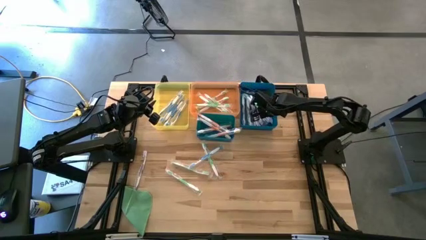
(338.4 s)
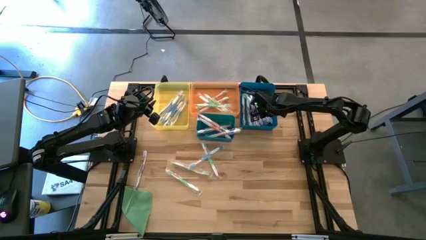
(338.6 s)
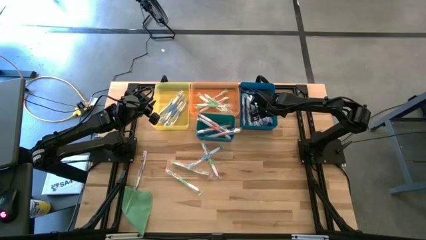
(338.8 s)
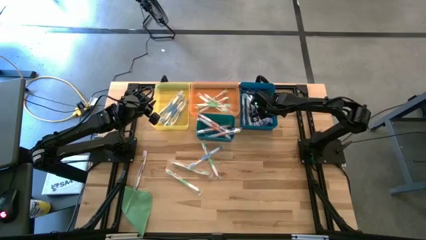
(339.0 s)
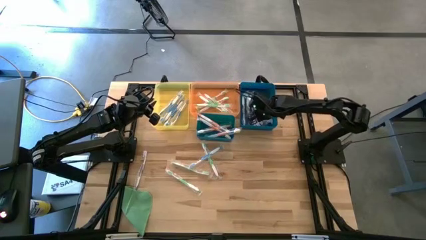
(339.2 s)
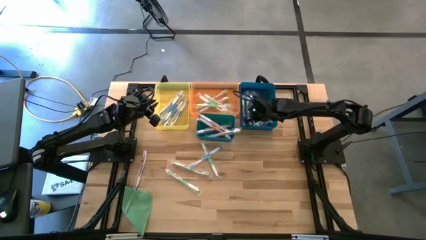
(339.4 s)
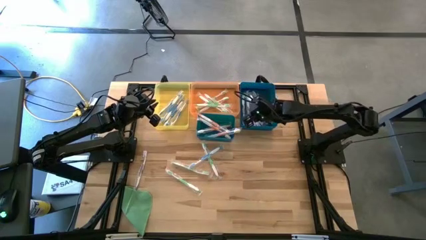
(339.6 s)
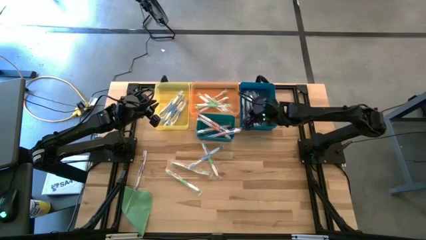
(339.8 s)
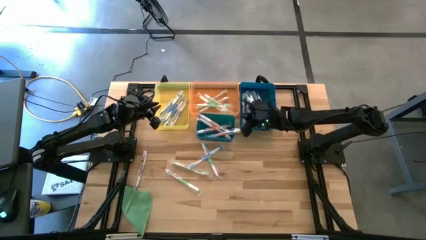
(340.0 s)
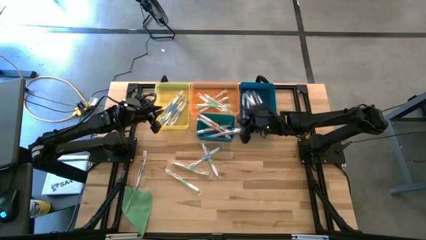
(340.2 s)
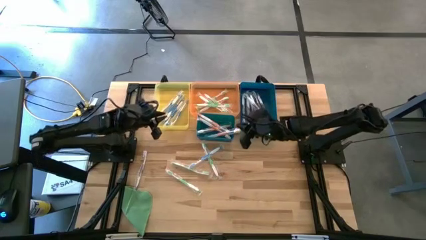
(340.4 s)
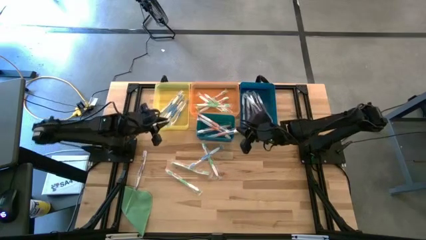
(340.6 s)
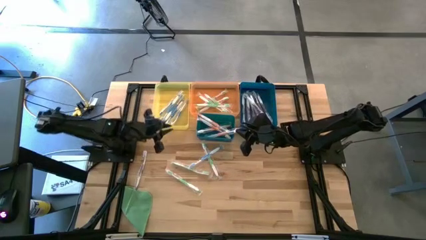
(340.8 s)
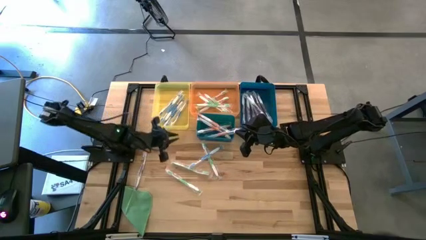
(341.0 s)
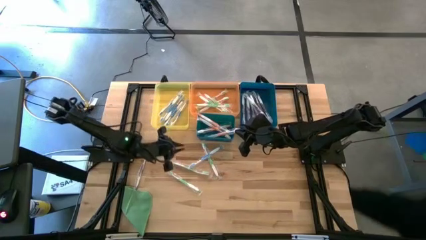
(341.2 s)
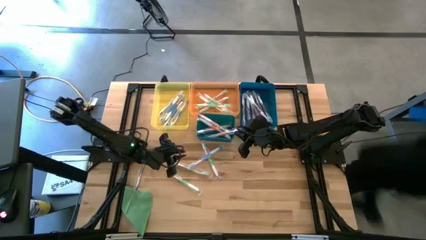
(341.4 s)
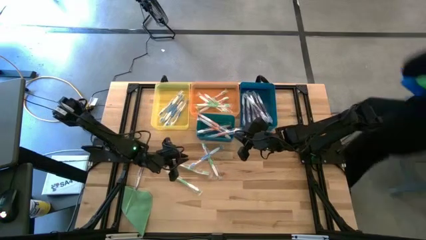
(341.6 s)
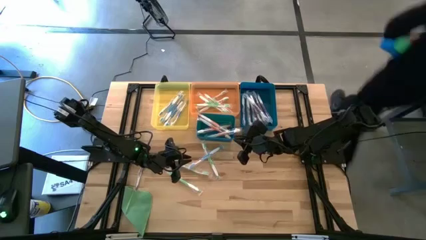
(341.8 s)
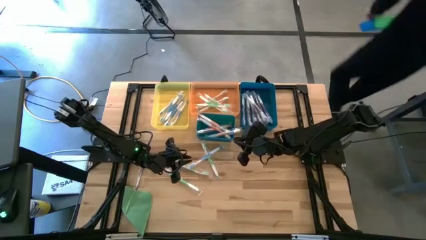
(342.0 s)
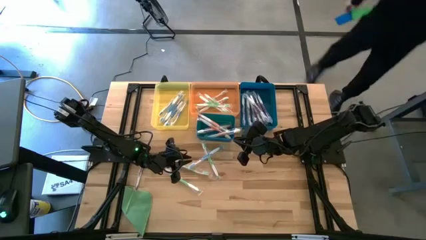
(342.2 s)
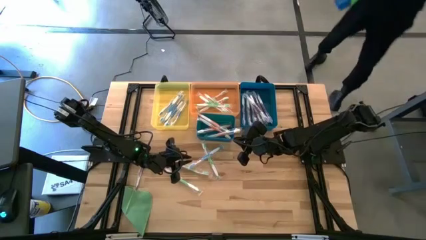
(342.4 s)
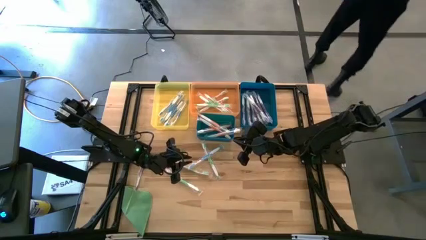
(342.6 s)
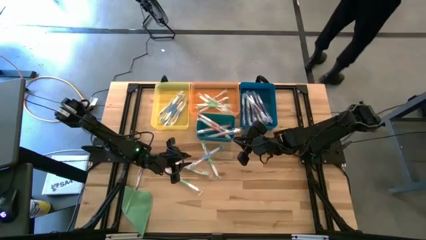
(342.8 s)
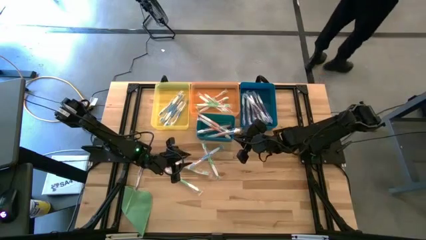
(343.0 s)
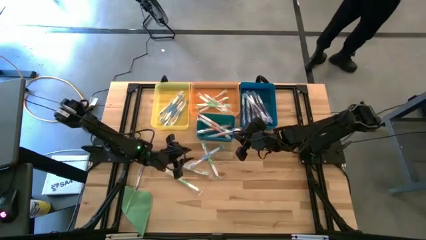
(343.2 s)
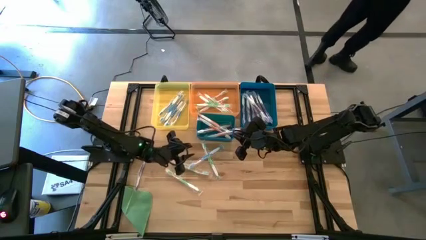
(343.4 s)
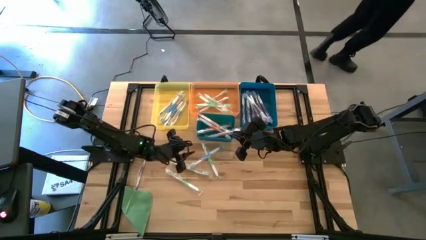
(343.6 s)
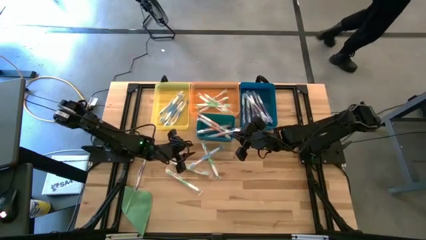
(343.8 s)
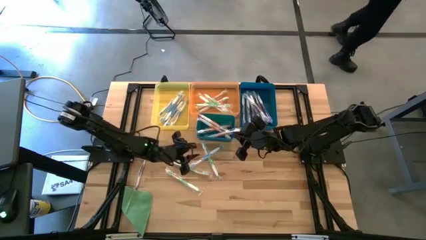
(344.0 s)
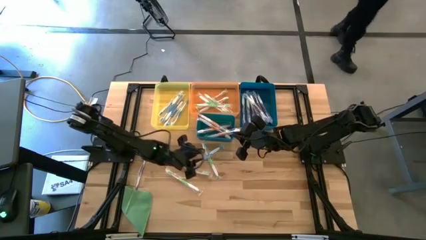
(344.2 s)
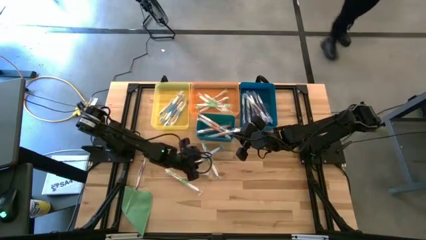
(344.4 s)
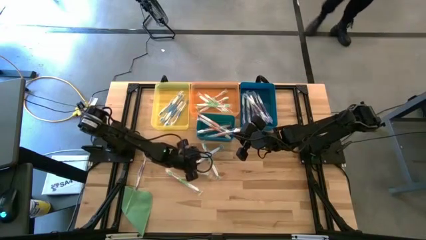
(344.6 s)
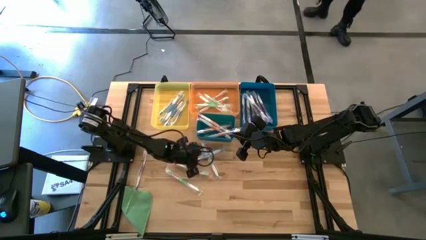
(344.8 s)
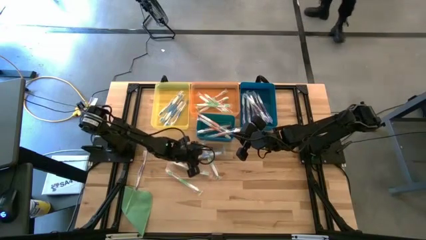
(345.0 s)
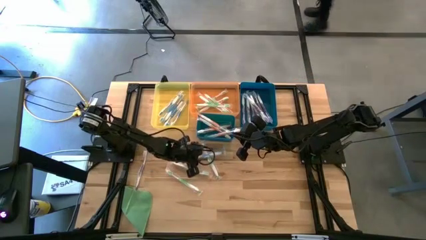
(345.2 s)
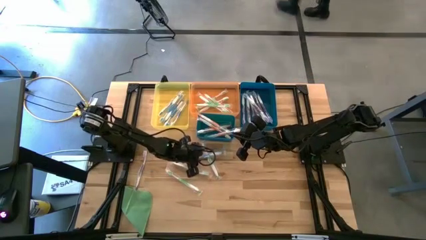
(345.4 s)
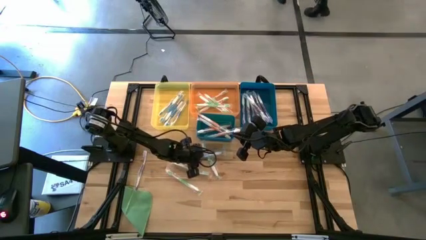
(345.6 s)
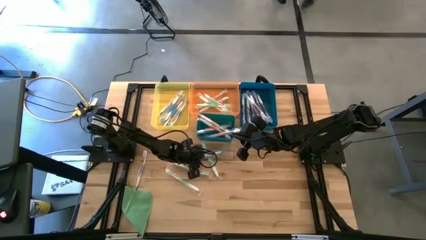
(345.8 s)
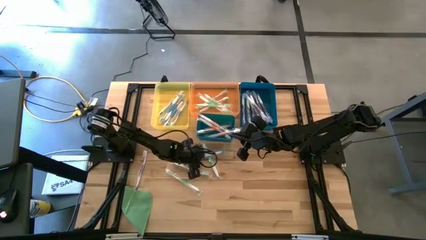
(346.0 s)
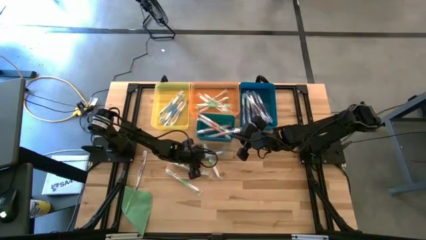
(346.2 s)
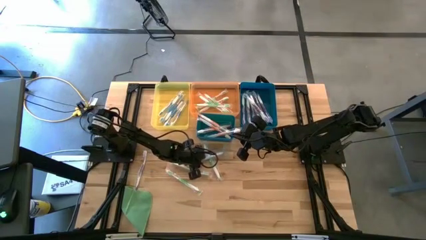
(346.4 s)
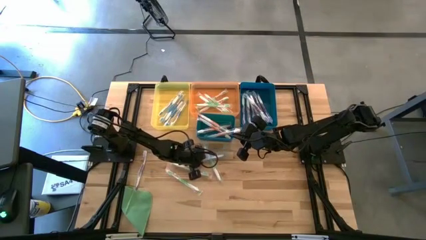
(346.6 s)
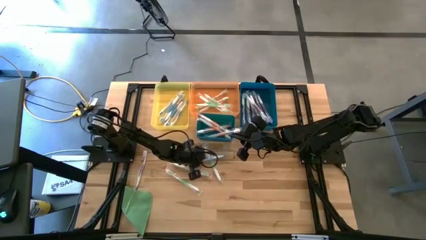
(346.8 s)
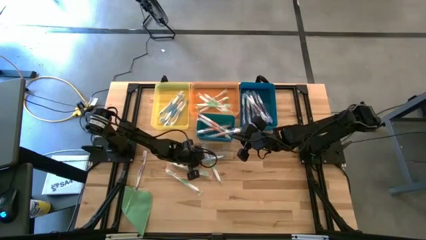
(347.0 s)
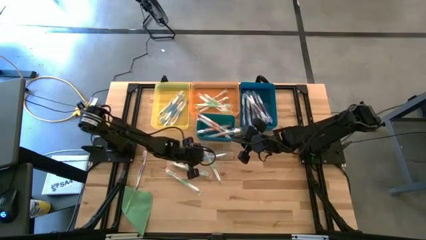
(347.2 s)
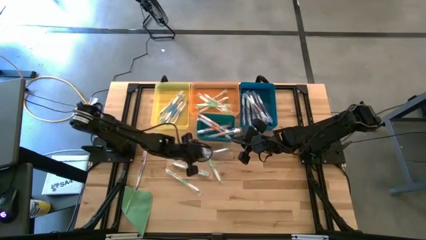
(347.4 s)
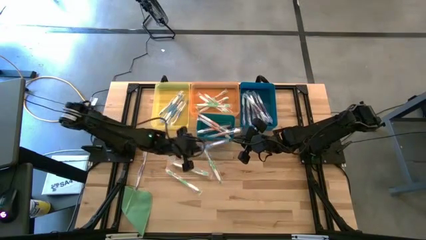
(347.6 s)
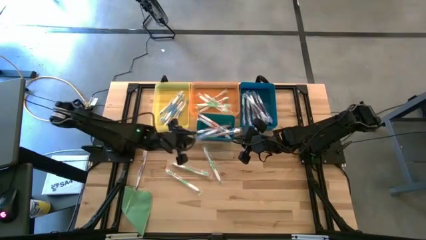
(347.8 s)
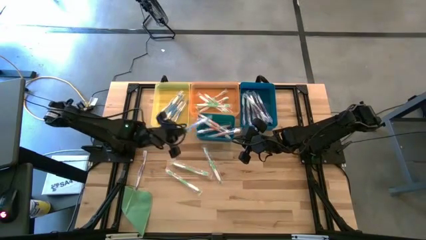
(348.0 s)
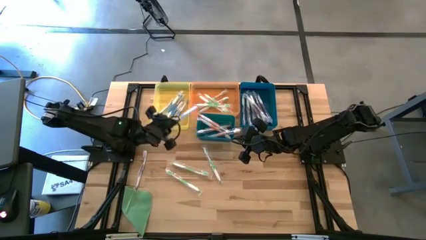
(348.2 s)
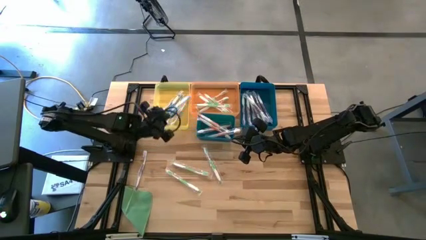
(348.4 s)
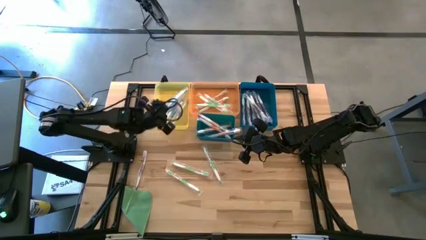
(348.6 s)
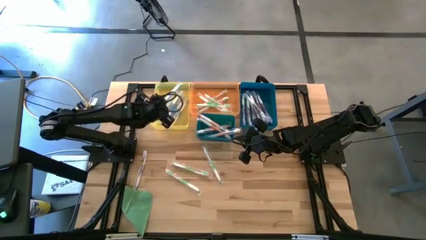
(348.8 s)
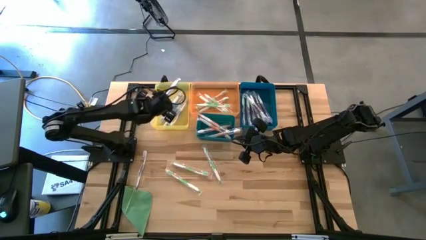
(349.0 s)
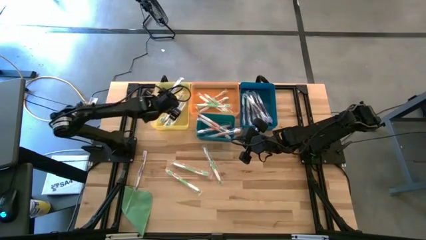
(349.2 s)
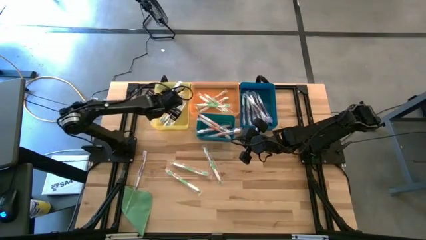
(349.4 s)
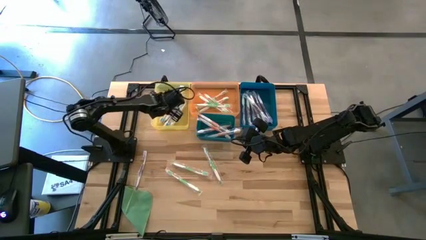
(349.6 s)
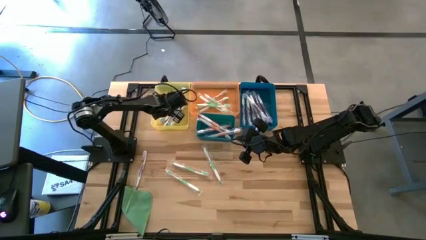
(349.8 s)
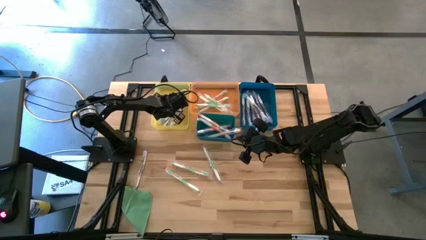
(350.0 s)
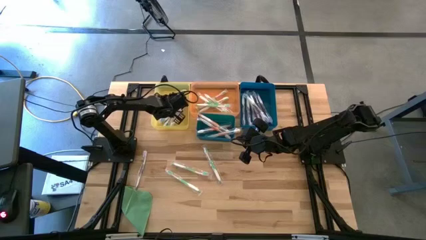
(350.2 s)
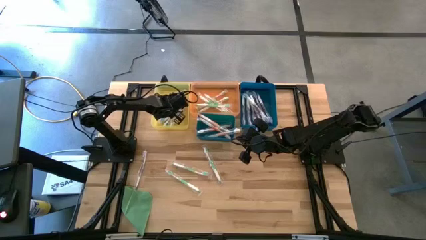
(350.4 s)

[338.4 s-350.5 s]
Task: Pick & Place Toothbrushes
Put the blue toothbrush into the yellow bin
